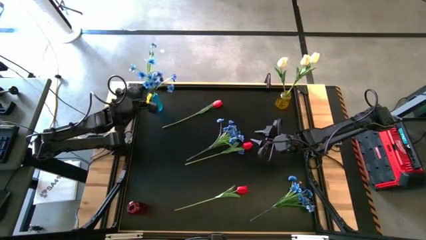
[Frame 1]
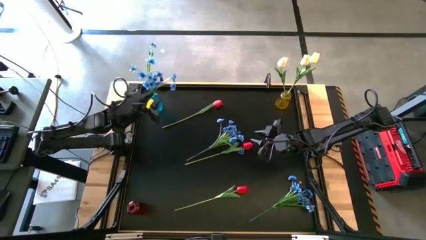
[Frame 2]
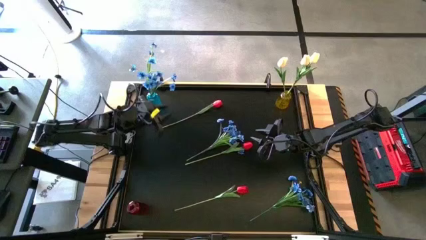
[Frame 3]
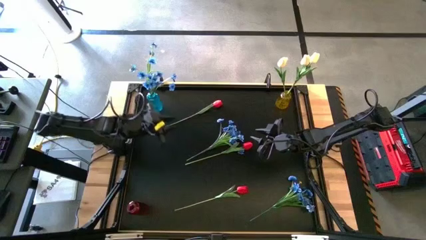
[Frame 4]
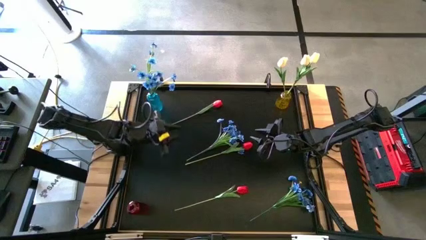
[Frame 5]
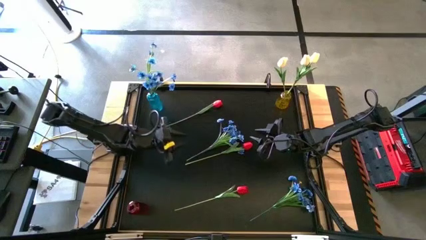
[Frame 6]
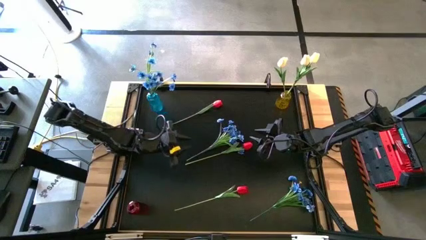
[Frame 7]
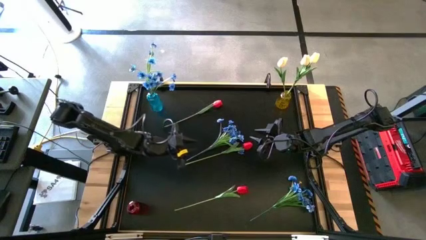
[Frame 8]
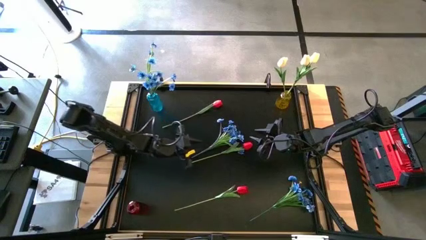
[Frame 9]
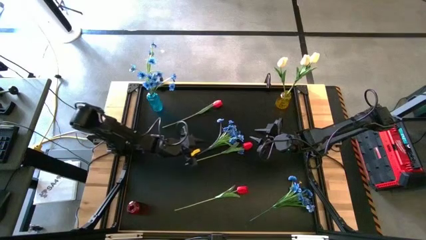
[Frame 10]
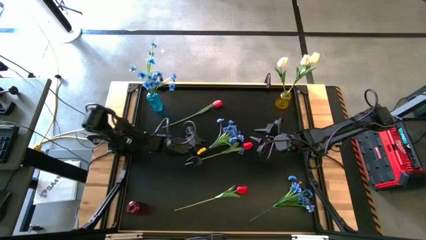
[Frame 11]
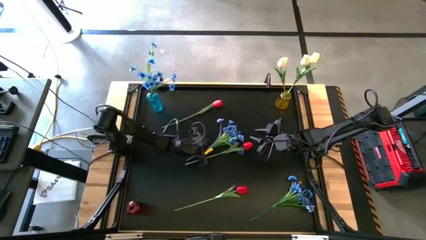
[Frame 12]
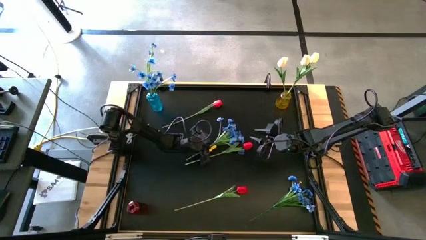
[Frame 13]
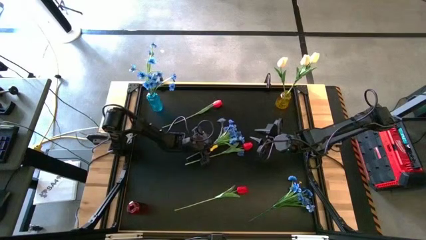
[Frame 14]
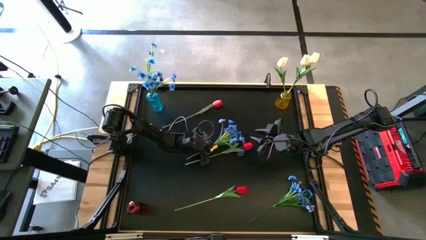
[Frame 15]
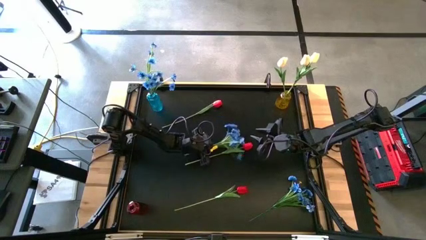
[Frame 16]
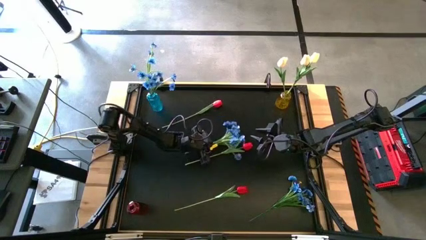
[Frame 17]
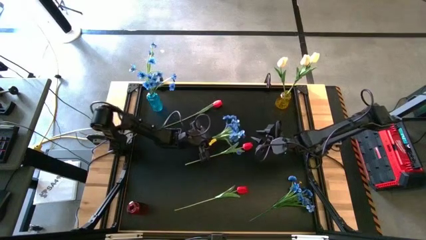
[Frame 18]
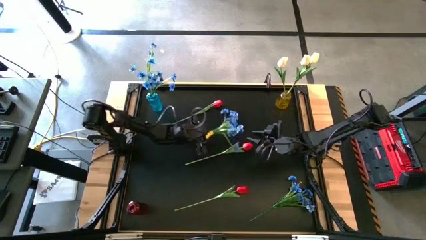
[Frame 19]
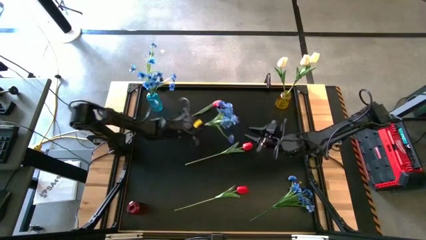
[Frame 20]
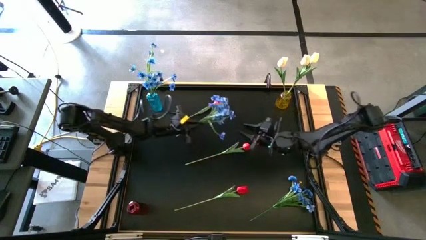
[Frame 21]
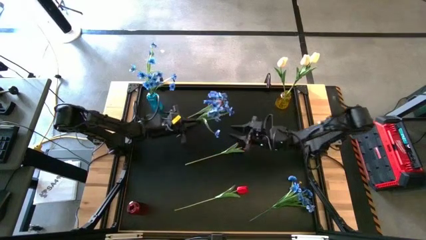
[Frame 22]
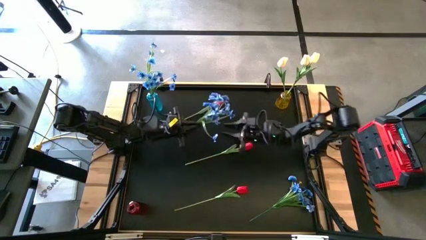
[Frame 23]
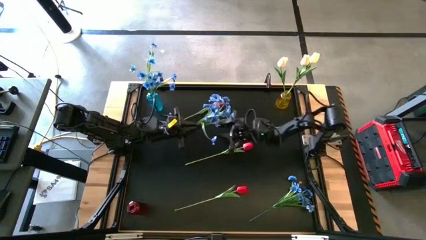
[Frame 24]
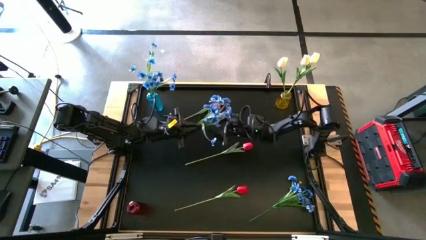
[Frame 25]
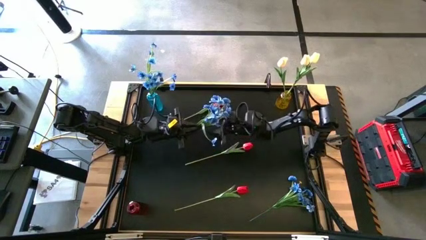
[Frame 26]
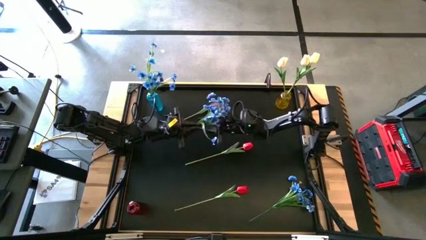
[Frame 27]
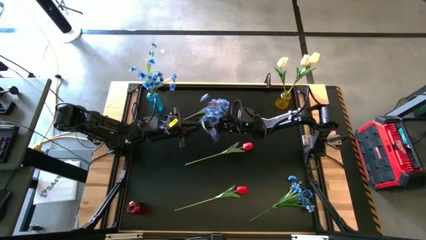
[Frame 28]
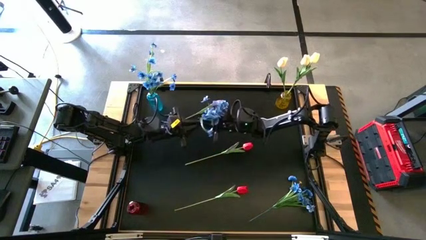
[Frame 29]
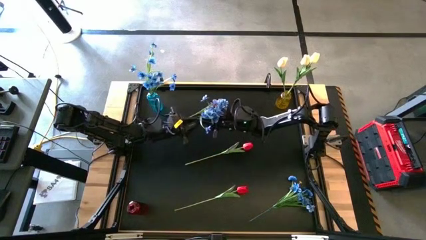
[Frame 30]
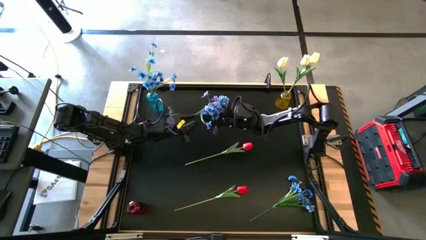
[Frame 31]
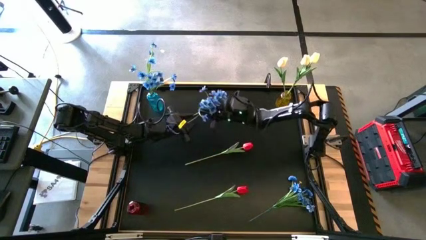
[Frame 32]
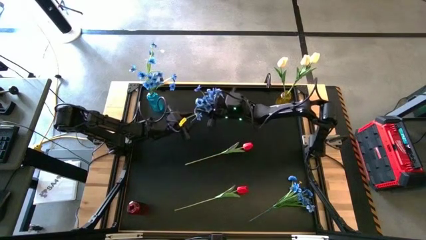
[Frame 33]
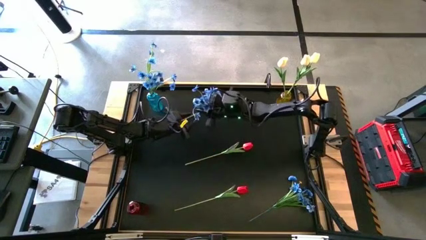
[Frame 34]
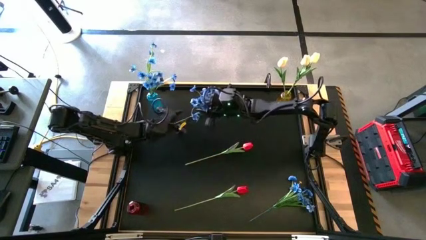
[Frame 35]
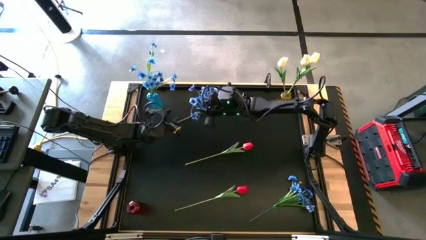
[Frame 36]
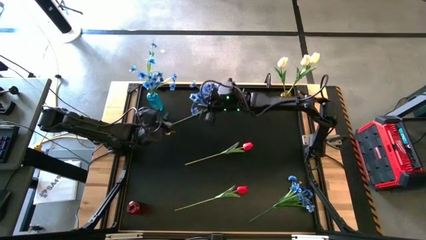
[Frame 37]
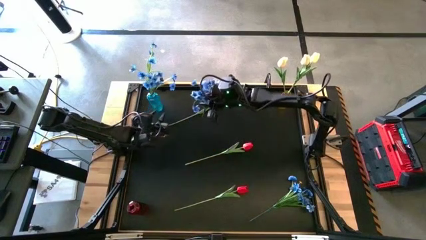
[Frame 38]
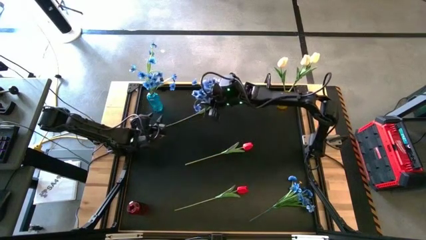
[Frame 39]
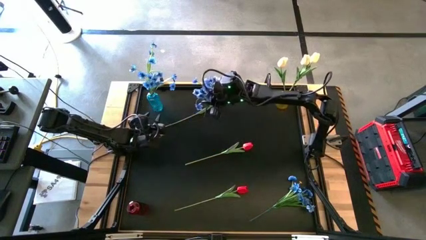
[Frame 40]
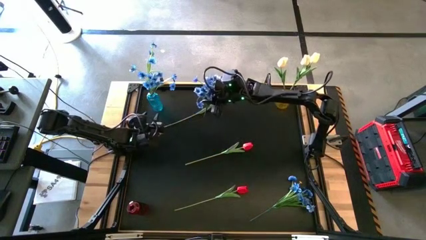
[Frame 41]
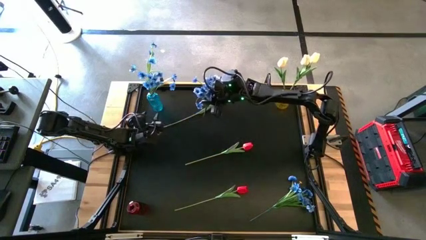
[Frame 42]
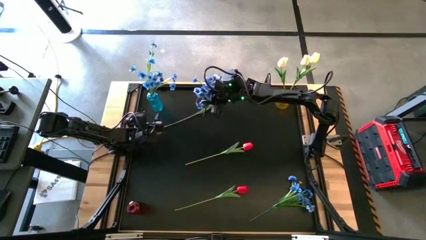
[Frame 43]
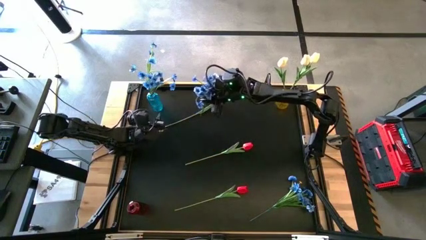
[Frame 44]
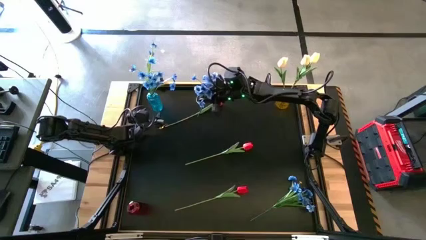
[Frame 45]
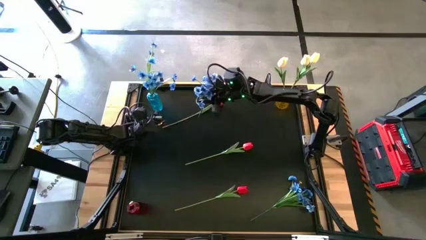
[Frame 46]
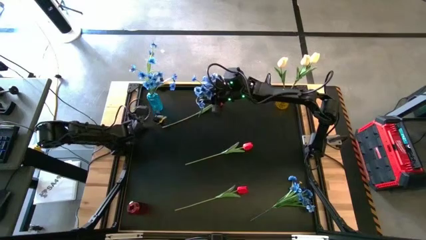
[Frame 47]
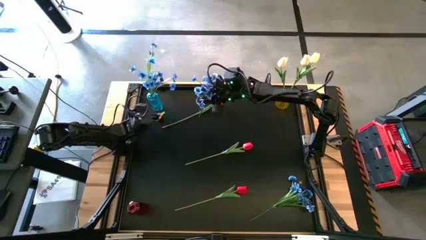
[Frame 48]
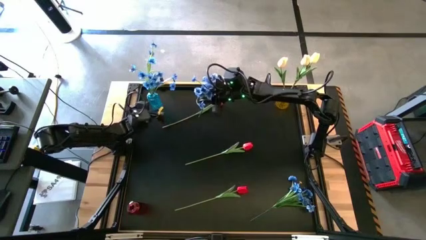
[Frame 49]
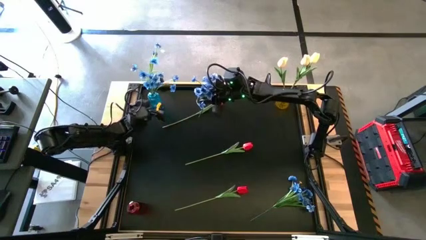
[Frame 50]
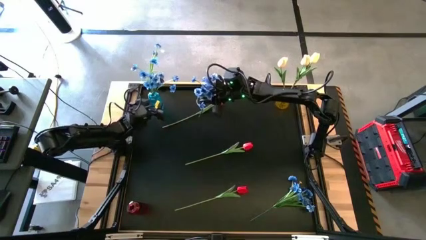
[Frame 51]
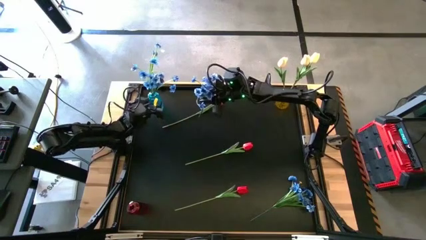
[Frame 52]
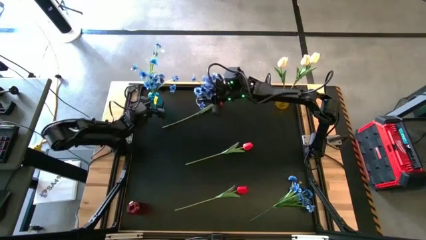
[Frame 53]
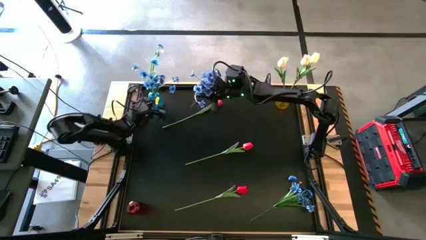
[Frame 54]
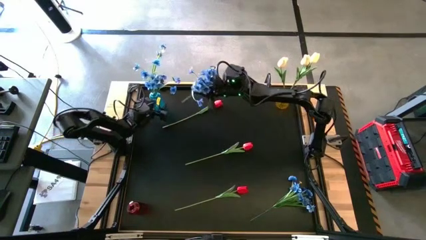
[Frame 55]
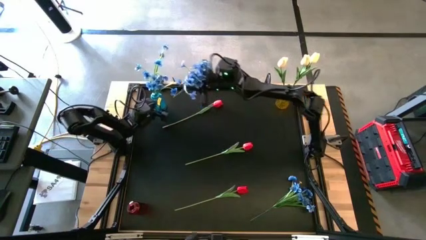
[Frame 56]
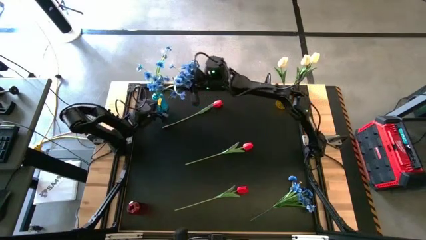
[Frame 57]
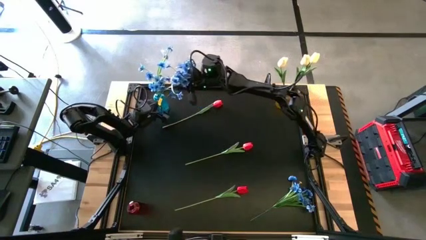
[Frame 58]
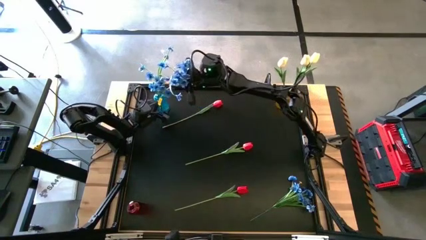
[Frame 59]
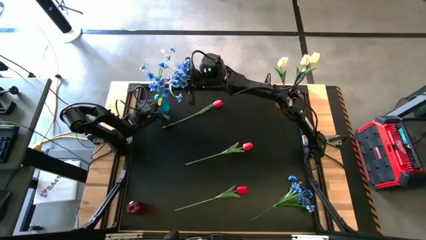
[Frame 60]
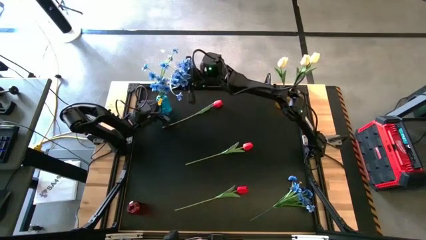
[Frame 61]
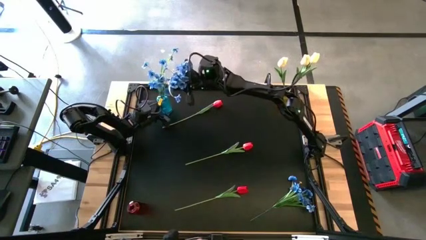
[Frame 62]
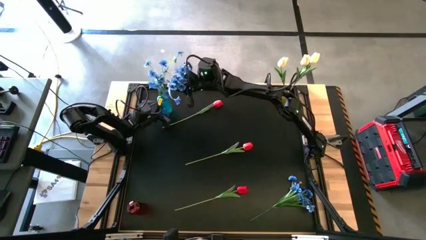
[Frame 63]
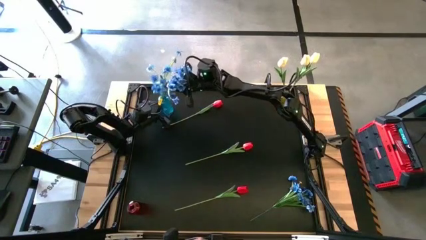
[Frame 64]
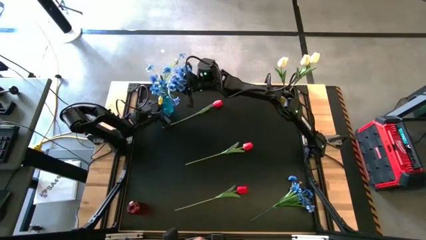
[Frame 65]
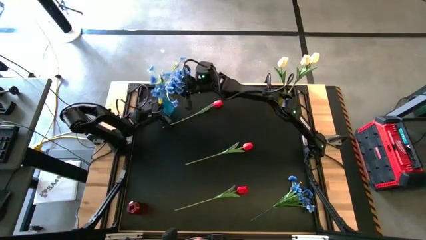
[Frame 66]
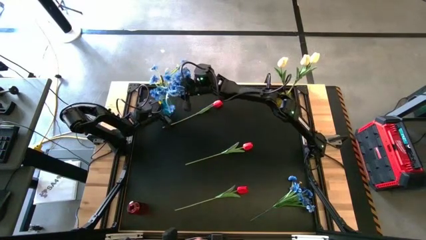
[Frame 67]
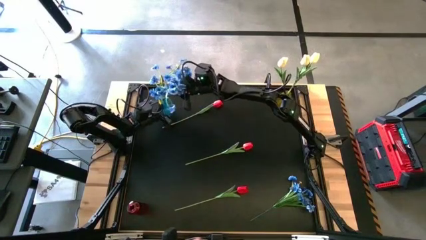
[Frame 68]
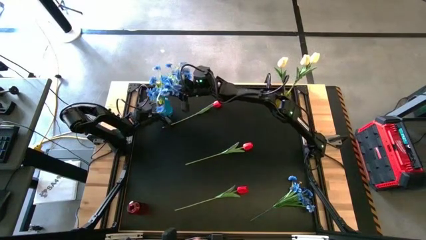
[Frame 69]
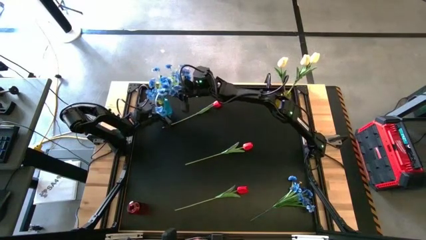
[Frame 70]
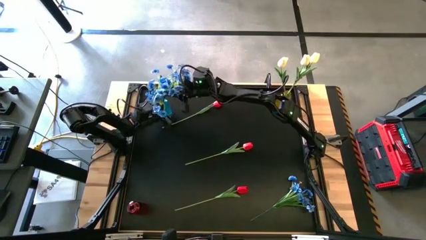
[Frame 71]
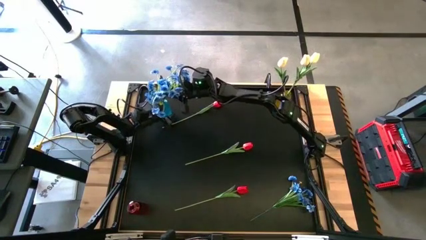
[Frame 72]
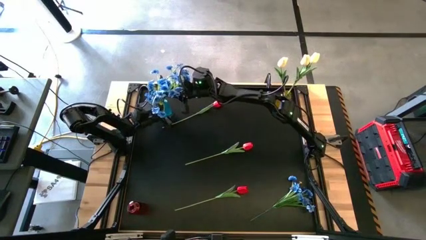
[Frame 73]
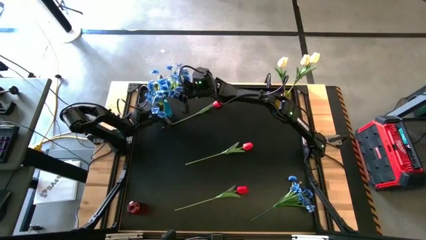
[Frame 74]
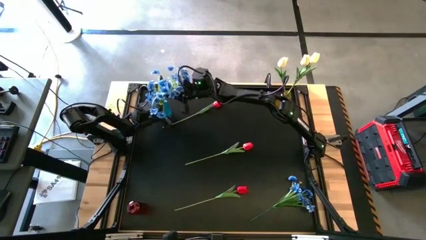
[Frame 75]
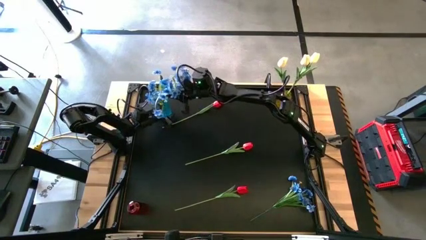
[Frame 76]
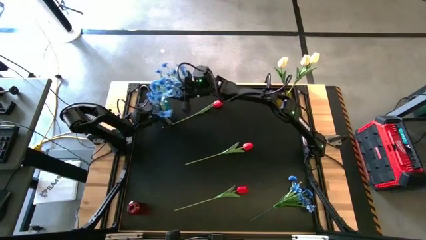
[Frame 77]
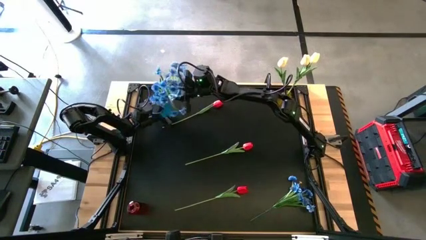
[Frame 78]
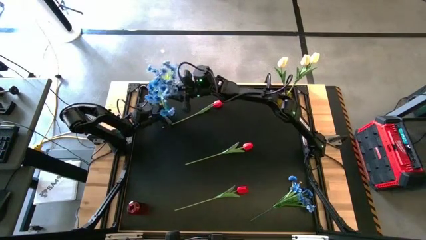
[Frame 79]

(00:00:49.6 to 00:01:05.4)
Task: Sort flowers into vase by color
Put the top blue flowers into the blue vase

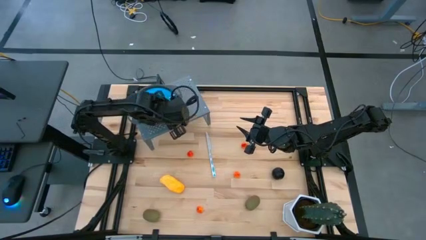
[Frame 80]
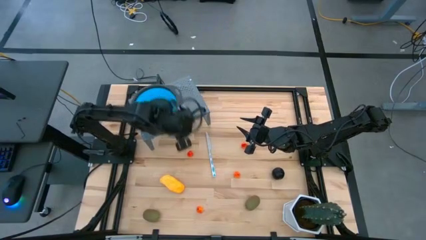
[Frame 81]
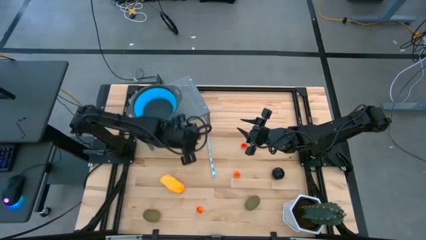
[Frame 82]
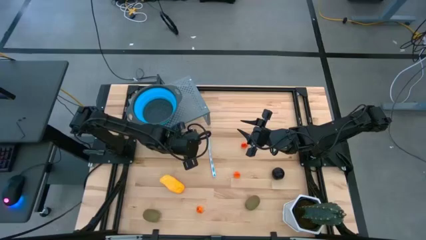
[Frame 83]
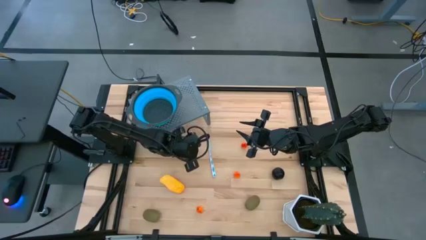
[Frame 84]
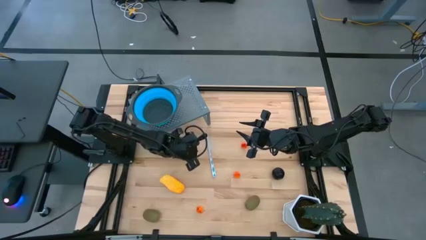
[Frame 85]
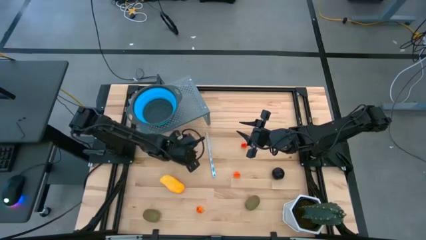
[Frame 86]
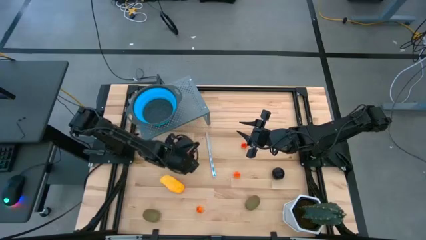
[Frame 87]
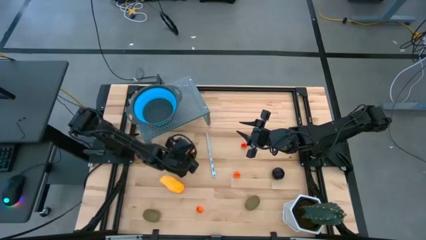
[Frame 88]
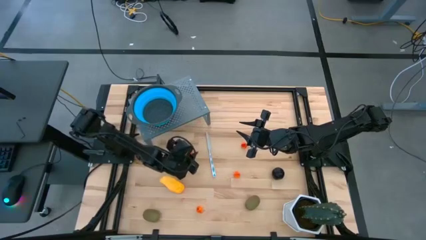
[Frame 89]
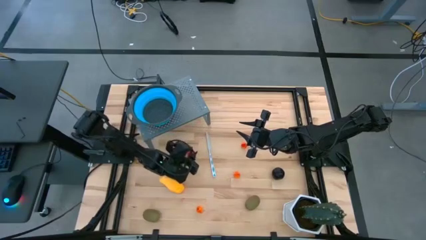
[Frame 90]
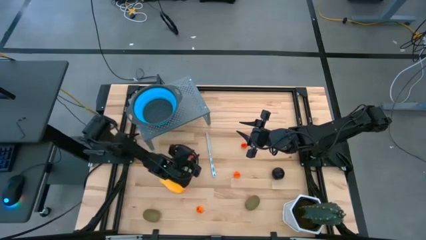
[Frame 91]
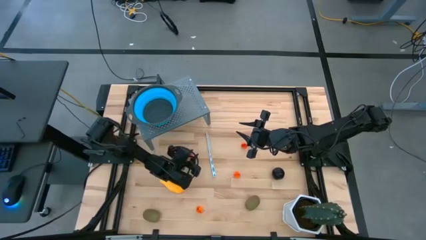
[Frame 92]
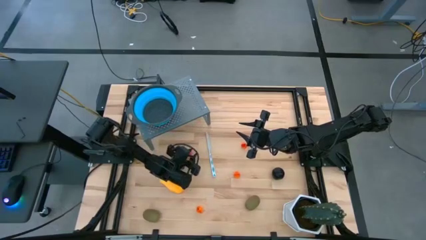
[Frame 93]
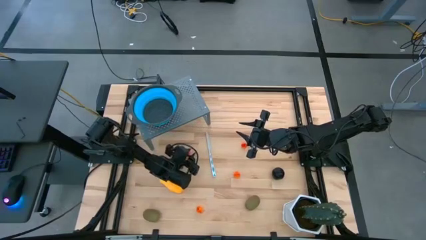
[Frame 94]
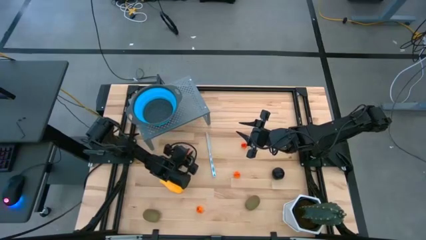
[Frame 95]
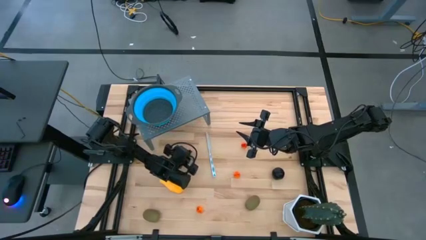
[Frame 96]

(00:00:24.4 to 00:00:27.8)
Task: Pick & Place Fruit
Put the orange peach into the blue strainer bowl on the shelf
